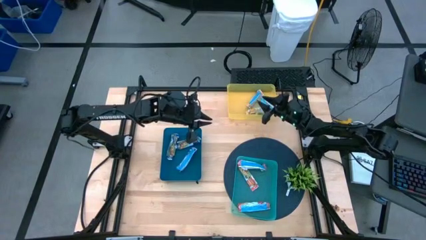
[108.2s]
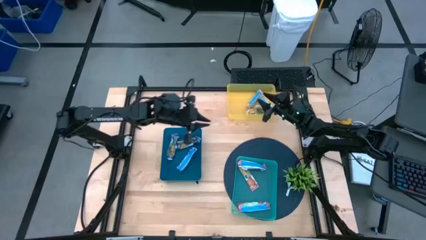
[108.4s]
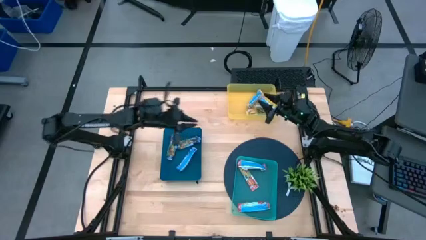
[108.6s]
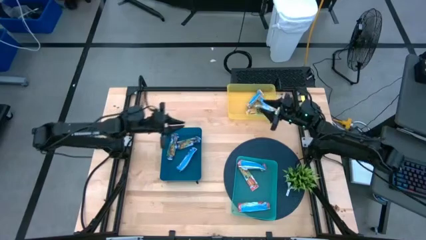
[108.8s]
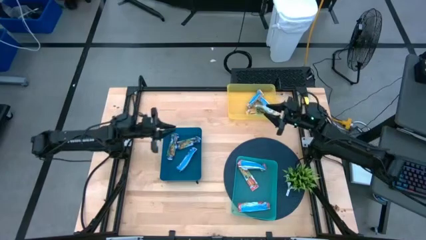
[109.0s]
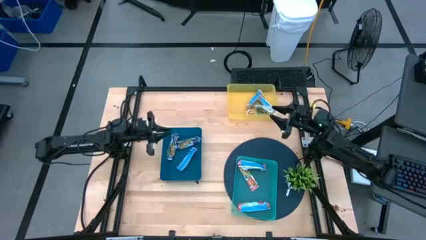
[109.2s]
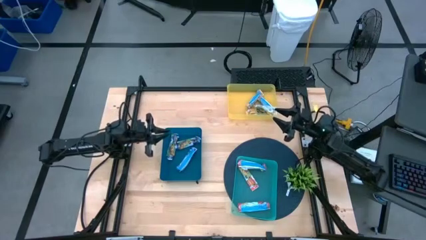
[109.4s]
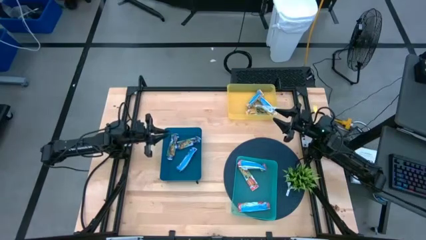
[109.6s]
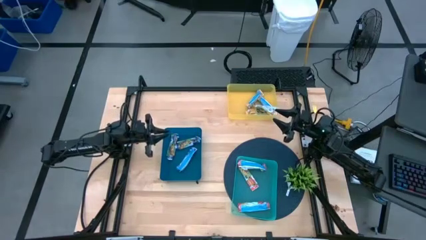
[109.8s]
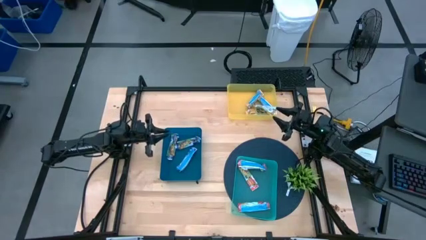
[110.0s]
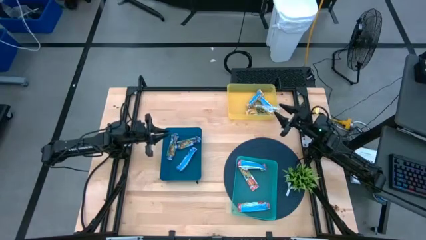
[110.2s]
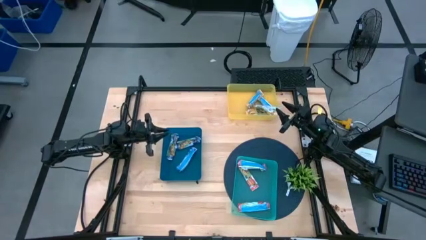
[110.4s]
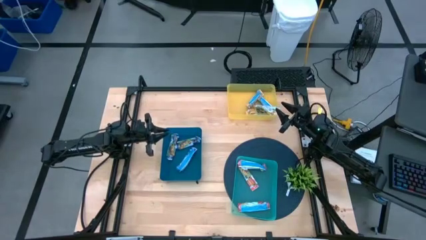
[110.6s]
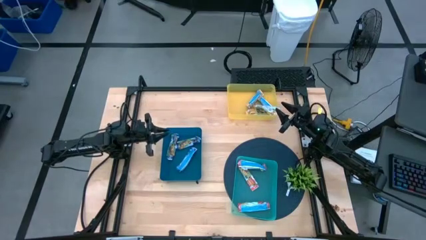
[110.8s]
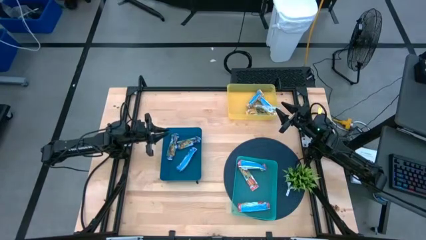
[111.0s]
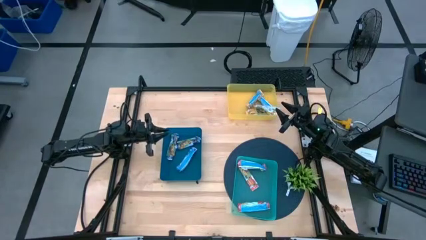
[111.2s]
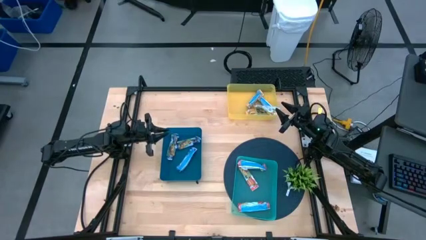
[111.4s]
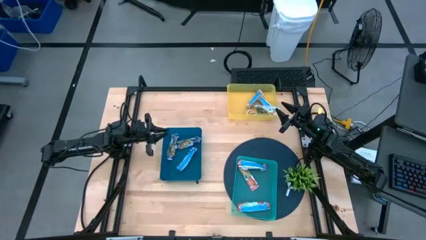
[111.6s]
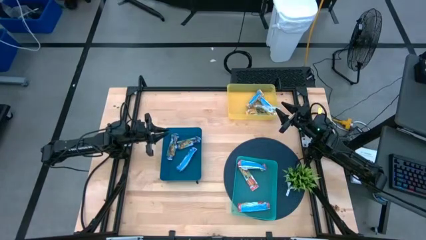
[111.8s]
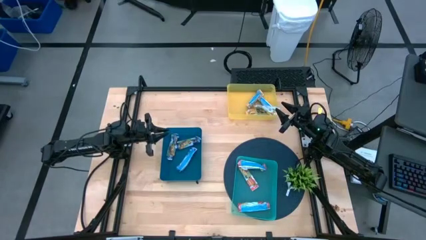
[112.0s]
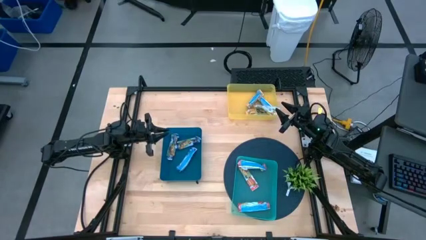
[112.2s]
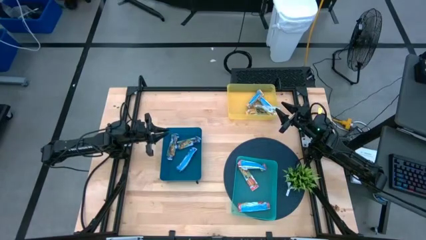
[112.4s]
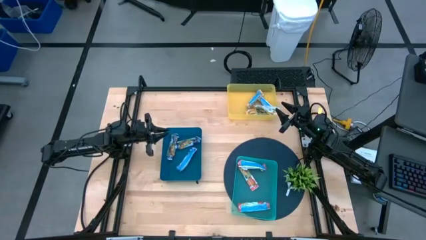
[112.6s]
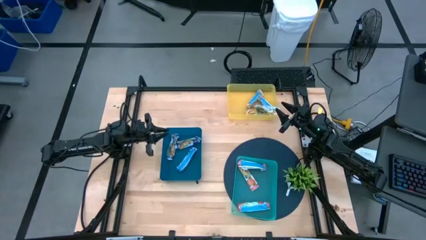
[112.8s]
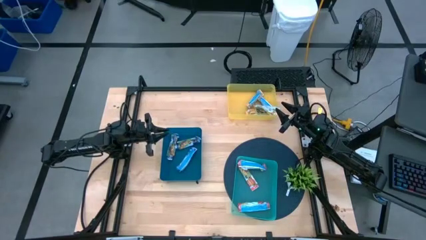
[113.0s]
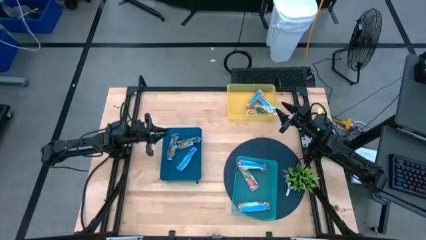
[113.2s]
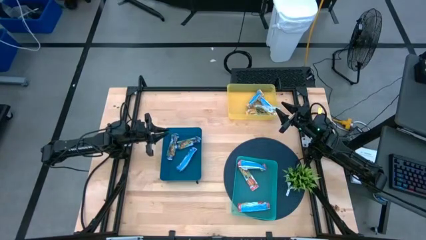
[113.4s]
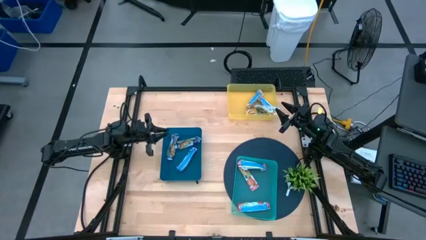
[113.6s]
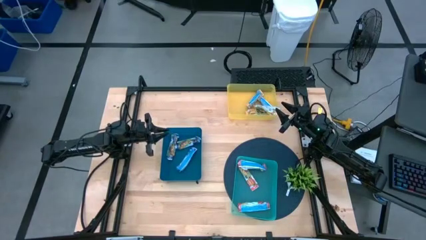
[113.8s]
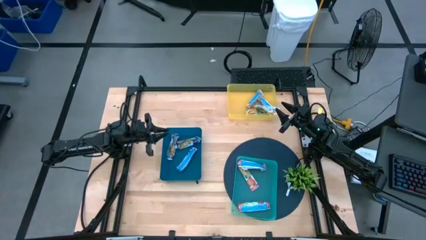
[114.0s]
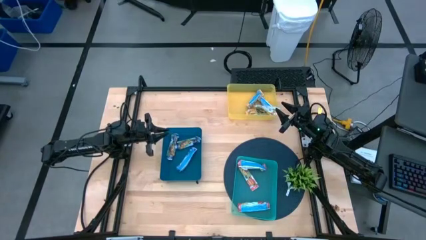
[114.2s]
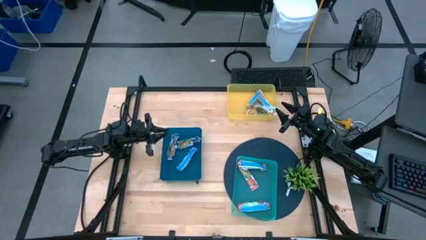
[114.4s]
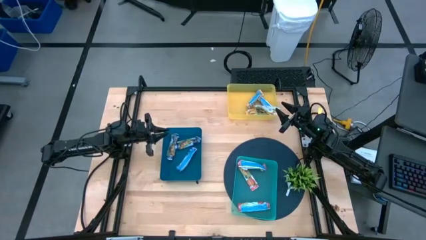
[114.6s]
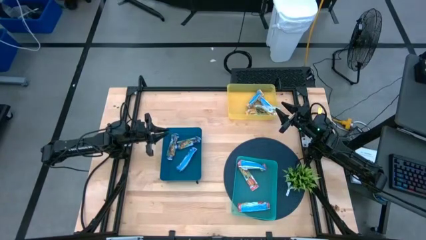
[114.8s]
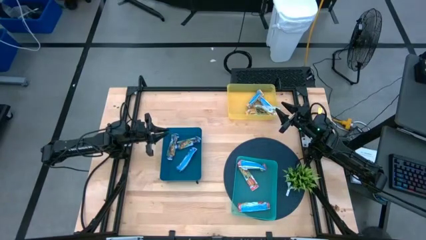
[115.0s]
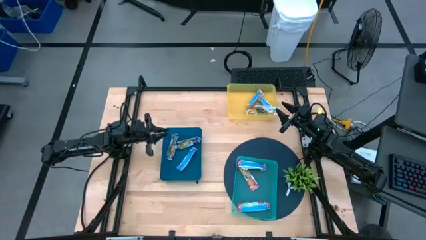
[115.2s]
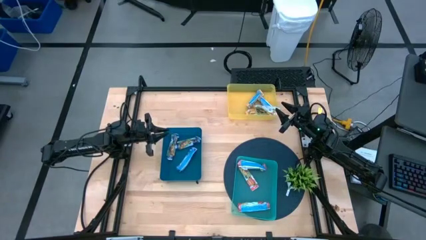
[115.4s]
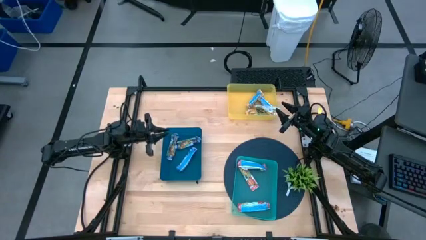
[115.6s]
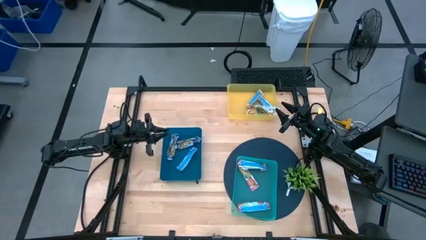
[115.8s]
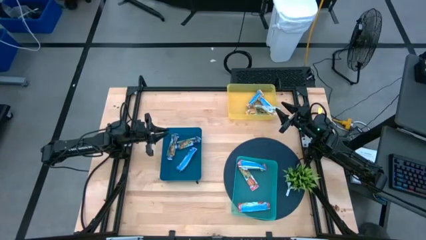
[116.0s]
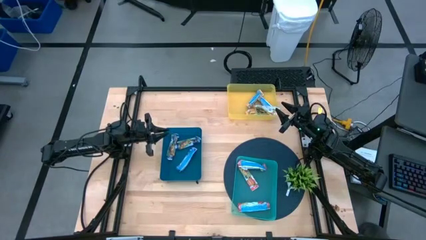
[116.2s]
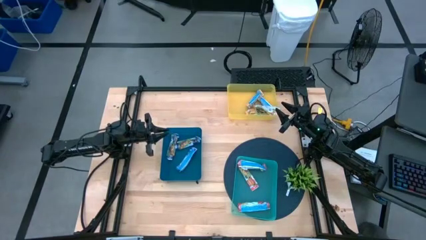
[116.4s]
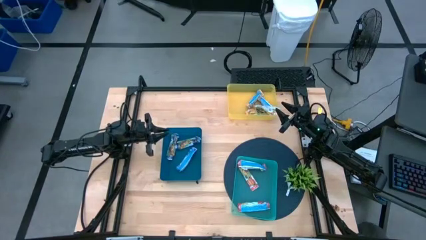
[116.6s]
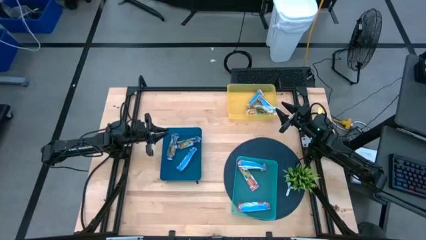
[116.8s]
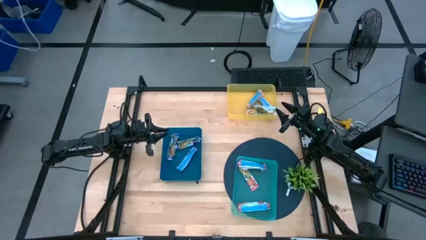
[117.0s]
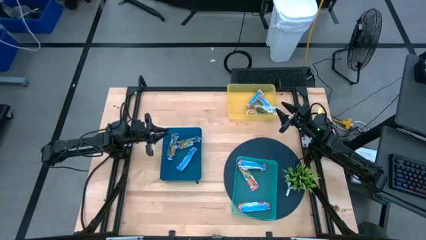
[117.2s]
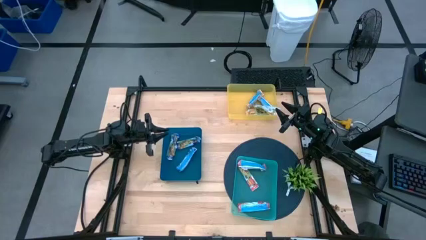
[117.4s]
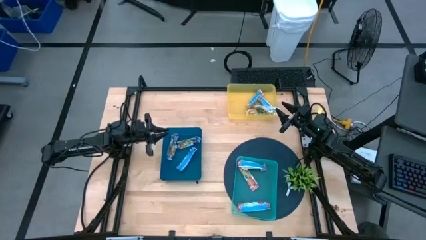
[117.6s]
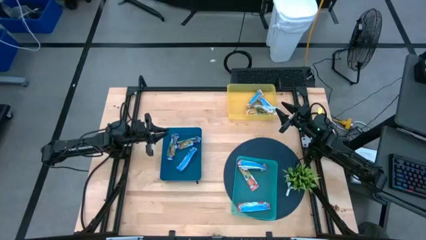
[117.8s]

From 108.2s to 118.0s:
Task: Pick and place Granola Bars by type
Return to Home Position

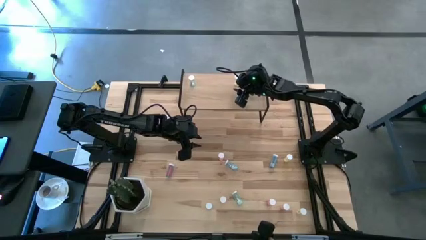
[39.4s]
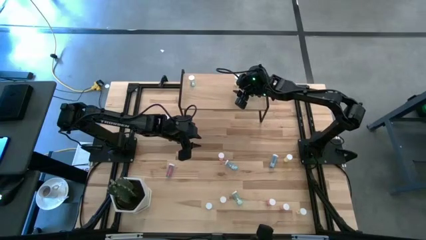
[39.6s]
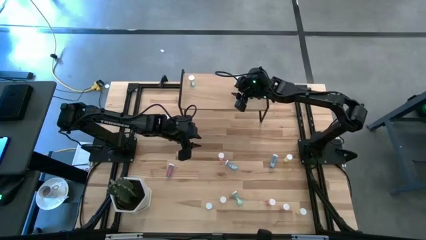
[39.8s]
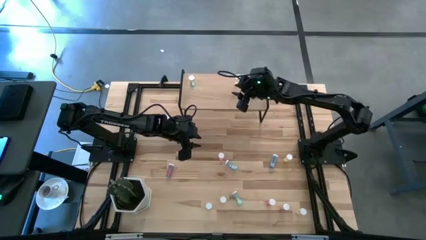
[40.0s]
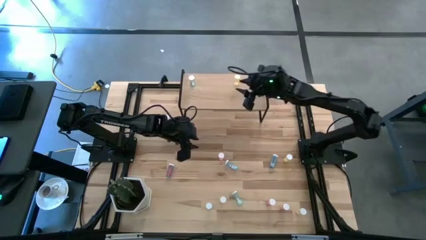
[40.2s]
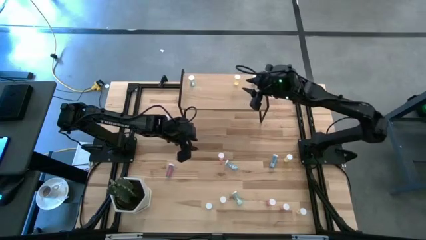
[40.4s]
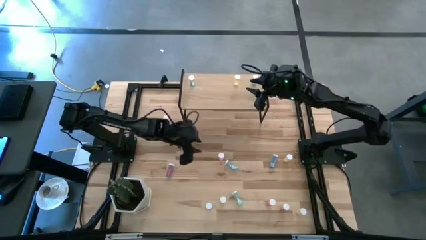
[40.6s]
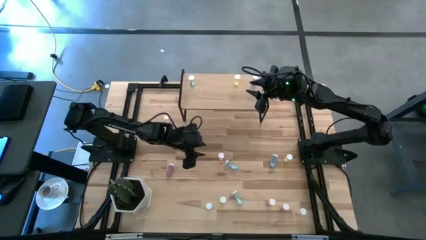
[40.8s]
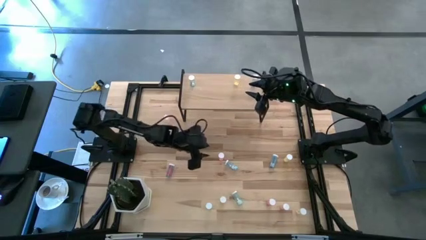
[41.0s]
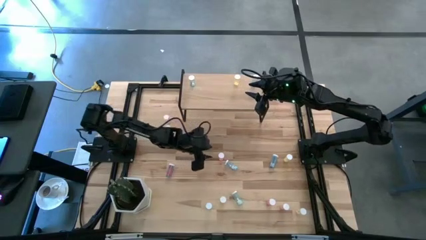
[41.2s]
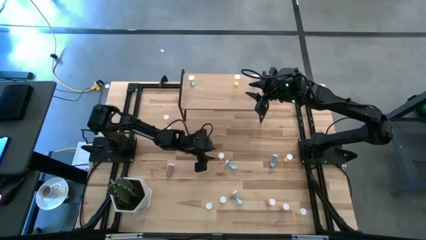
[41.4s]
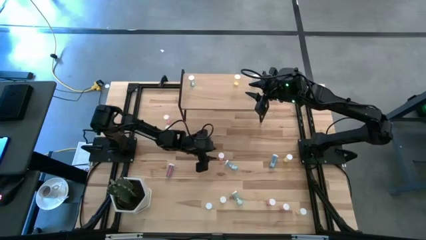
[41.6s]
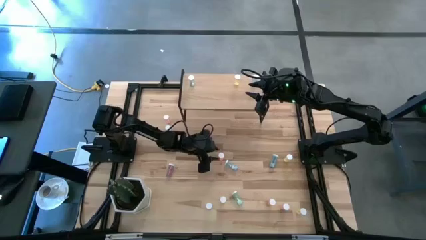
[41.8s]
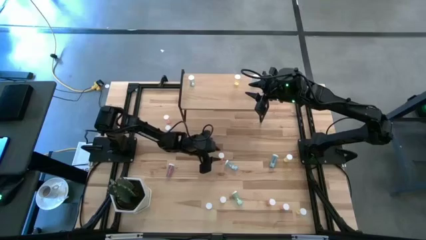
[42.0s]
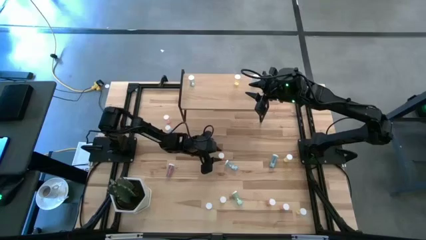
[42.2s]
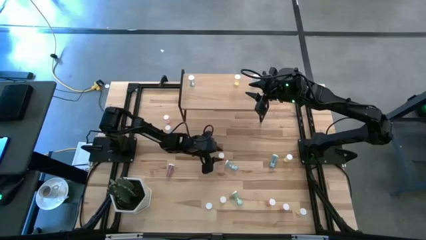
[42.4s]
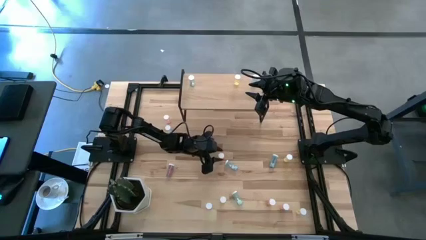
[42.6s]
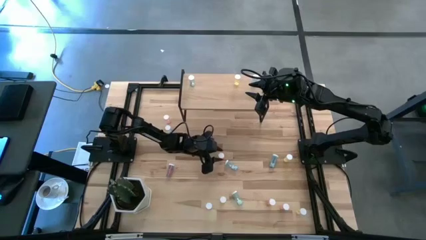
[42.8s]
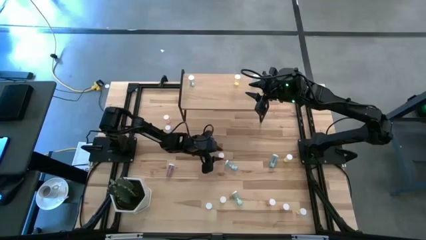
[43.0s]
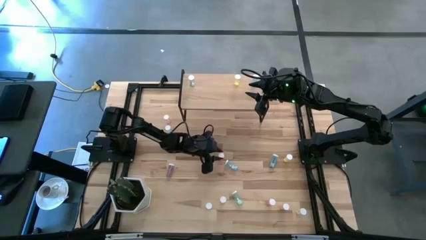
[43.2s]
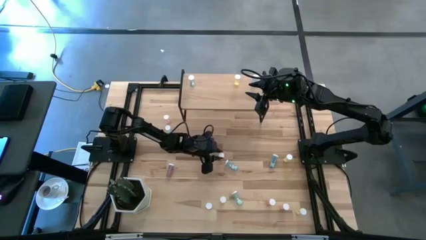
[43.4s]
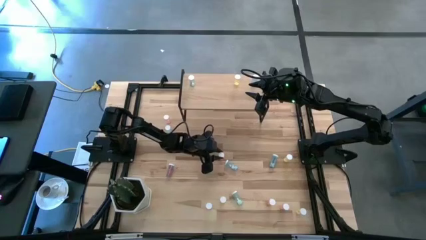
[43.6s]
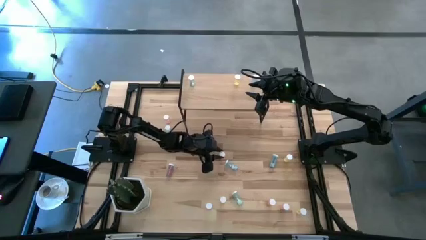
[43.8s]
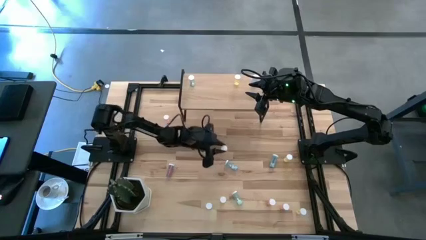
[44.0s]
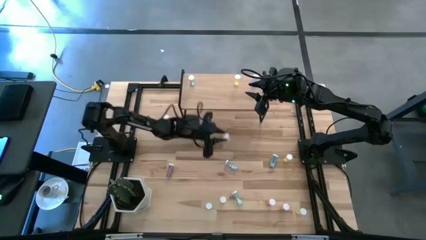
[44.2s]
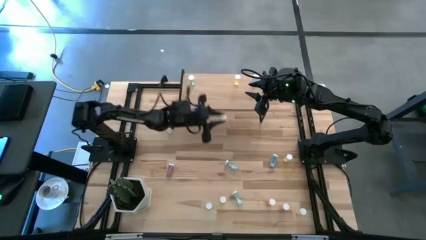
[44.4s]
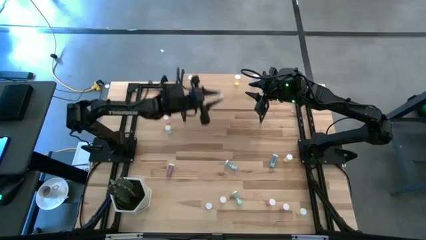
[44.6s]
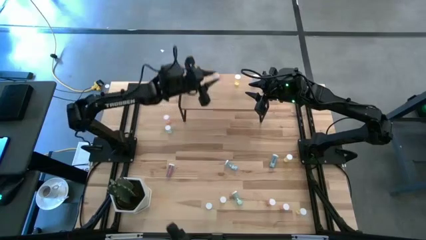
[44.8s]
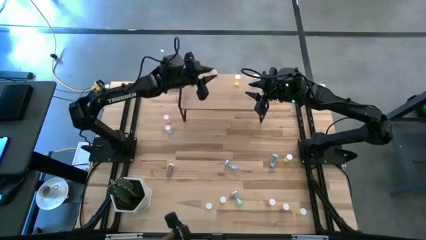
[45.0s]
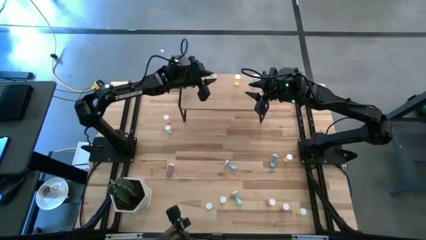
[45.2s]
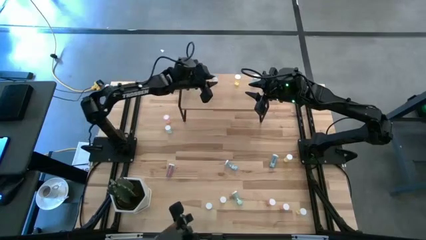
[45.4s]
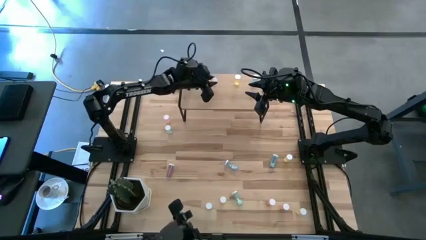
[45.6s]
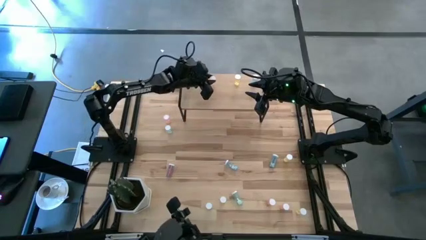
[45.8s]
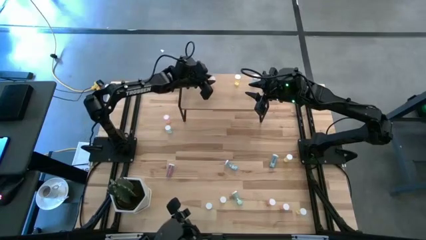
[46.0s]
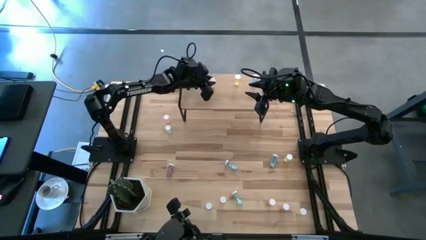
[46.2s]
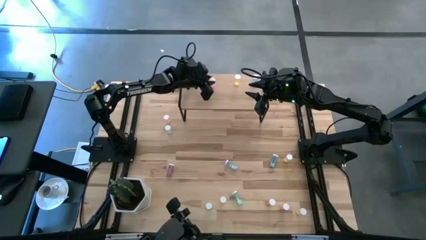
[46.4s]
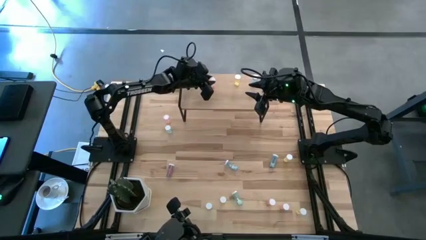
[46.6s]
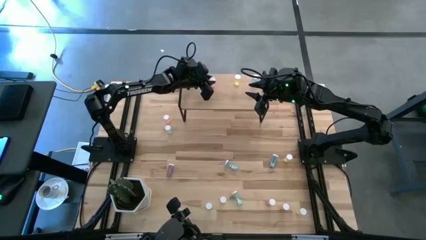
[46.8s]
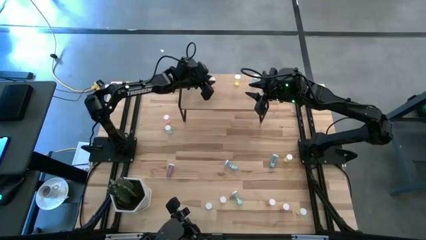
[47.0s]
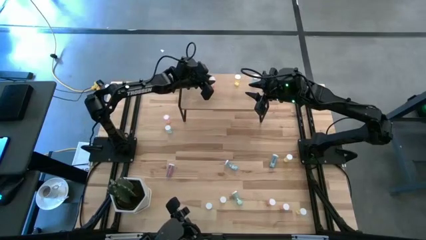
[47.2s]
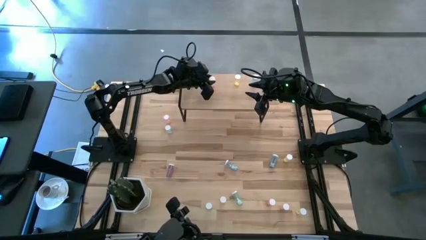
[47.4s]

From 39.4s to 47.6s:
Task: Pick and place medicine bottles onto shelf by color
Put the pink pill bottle on the shelf
